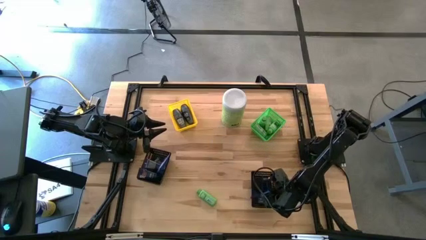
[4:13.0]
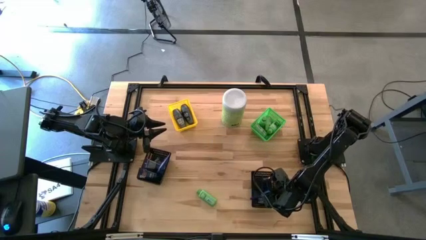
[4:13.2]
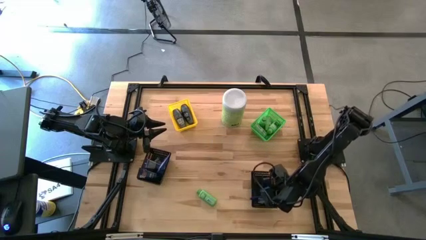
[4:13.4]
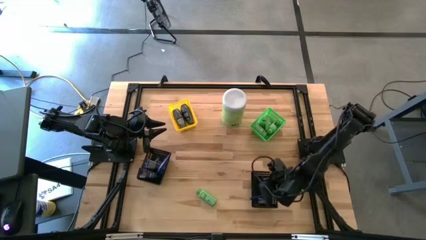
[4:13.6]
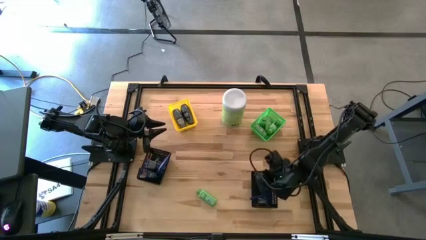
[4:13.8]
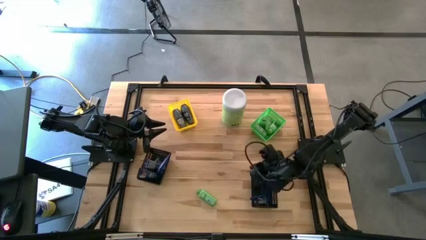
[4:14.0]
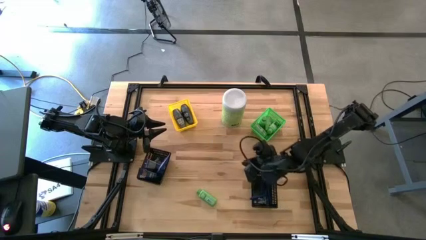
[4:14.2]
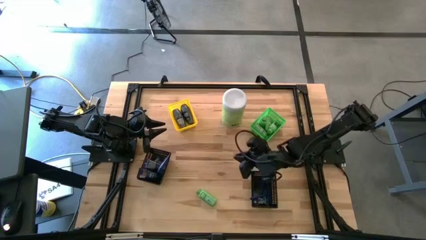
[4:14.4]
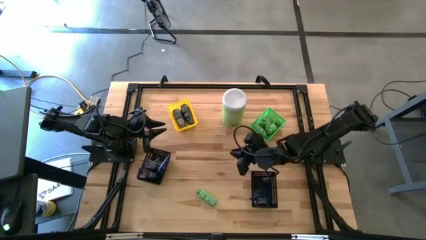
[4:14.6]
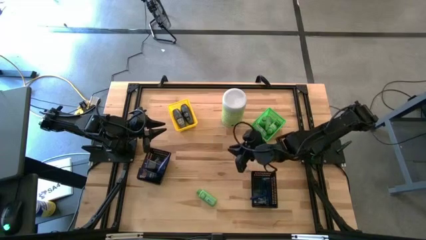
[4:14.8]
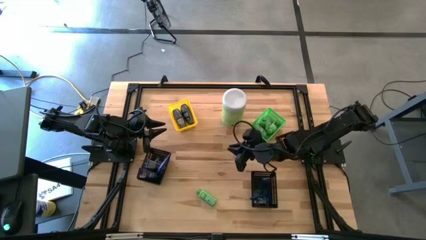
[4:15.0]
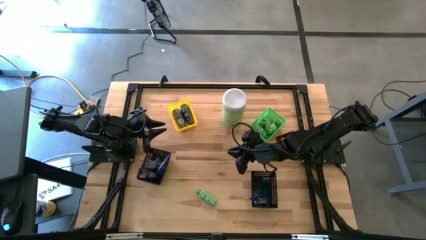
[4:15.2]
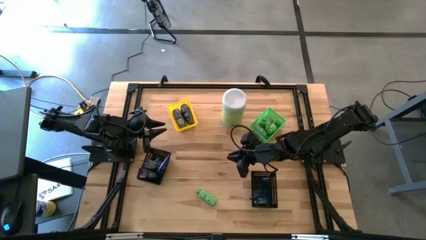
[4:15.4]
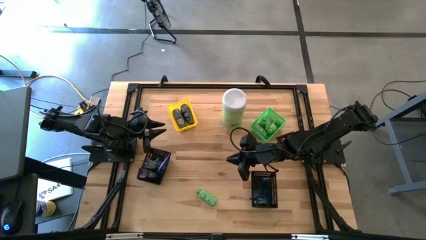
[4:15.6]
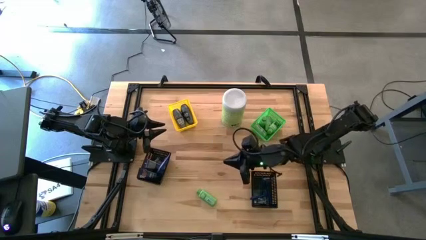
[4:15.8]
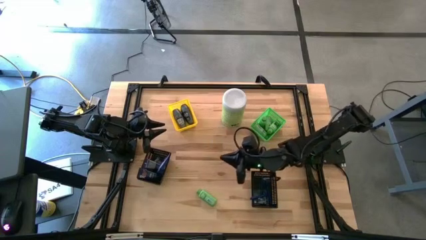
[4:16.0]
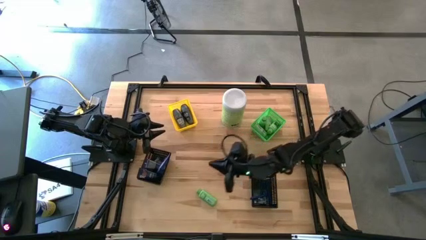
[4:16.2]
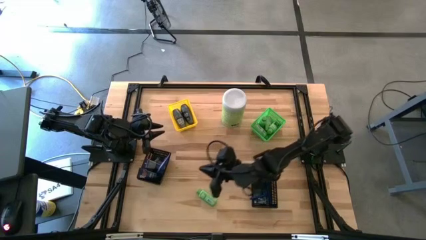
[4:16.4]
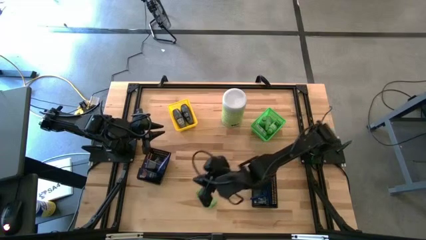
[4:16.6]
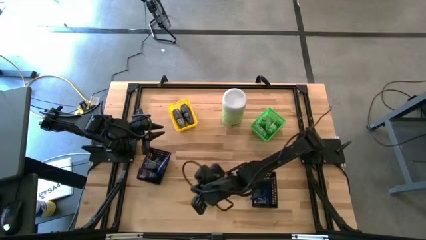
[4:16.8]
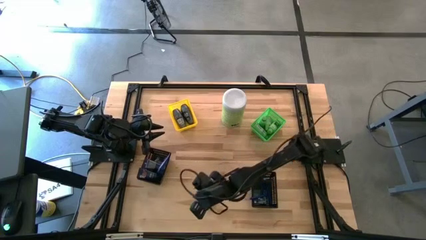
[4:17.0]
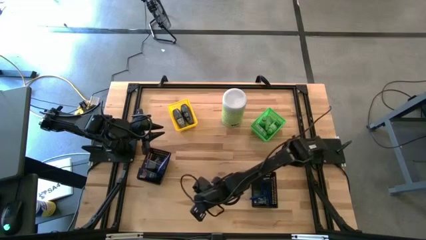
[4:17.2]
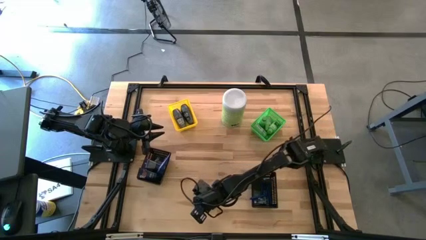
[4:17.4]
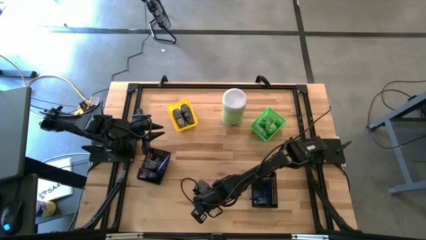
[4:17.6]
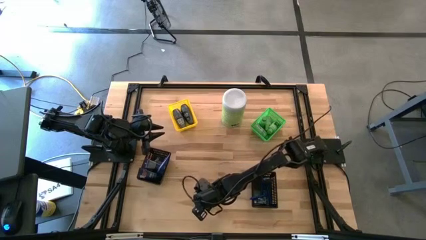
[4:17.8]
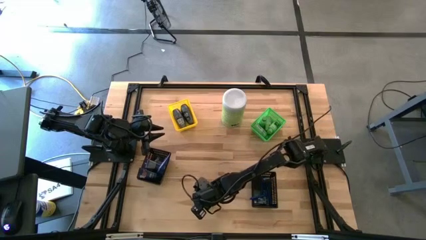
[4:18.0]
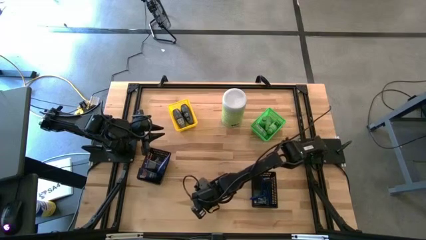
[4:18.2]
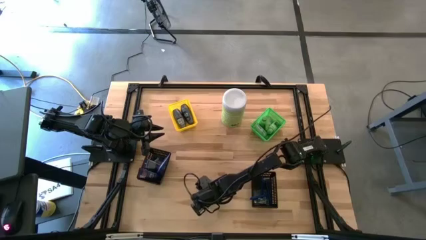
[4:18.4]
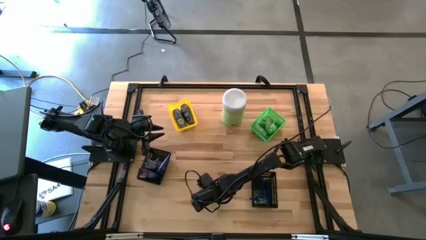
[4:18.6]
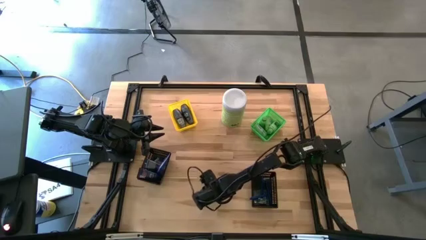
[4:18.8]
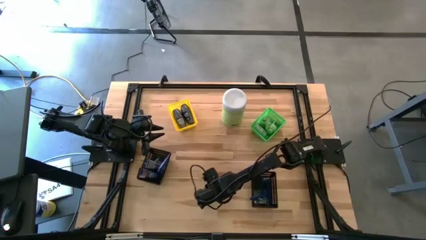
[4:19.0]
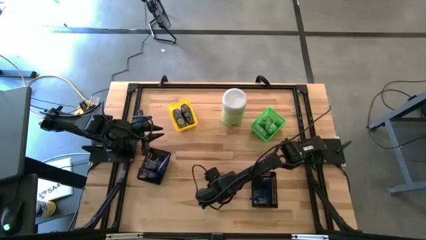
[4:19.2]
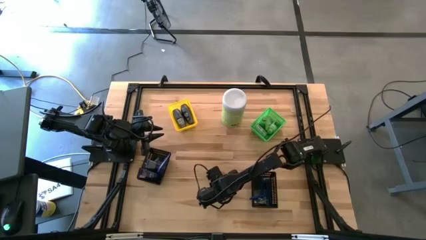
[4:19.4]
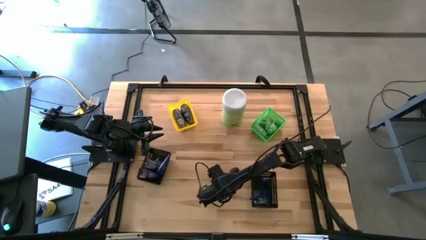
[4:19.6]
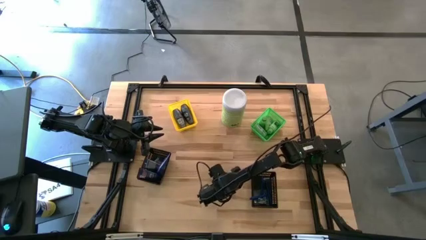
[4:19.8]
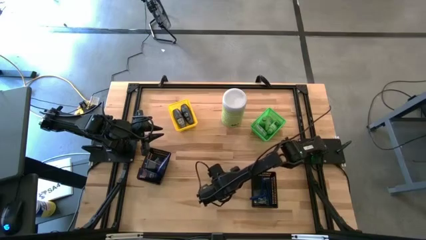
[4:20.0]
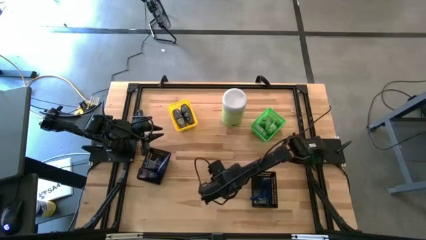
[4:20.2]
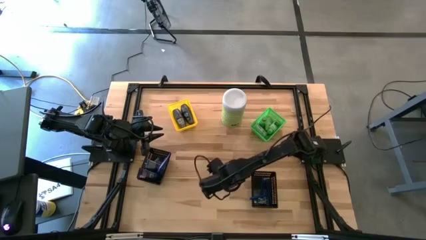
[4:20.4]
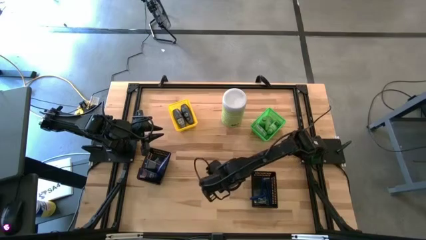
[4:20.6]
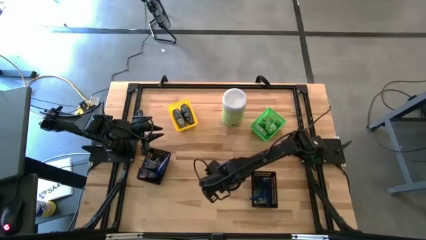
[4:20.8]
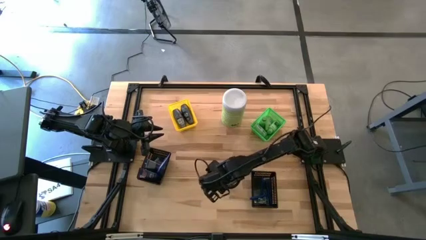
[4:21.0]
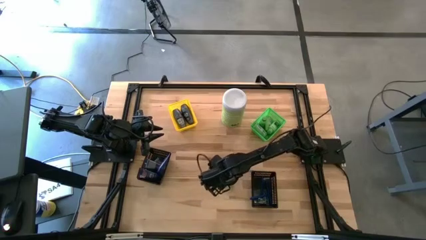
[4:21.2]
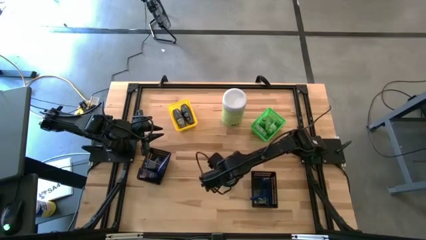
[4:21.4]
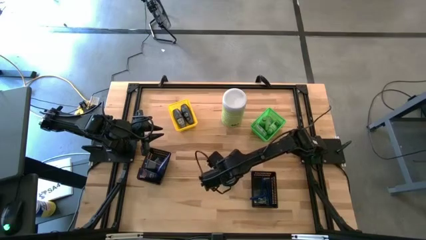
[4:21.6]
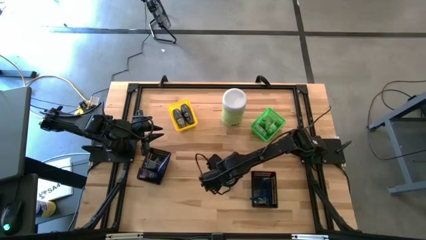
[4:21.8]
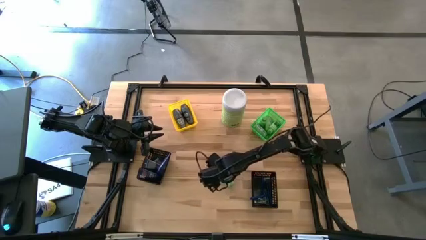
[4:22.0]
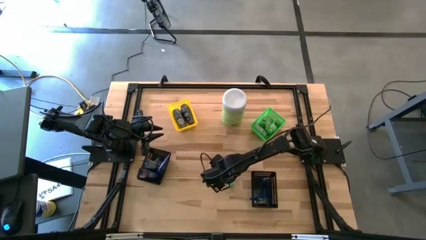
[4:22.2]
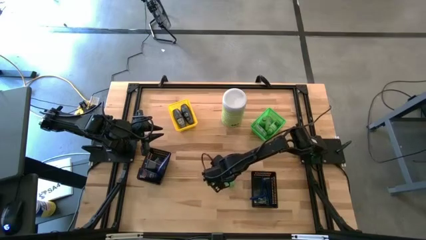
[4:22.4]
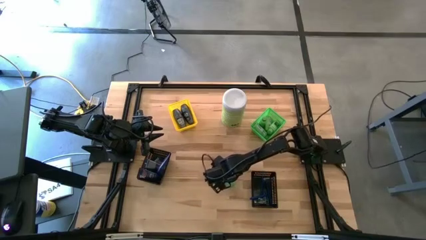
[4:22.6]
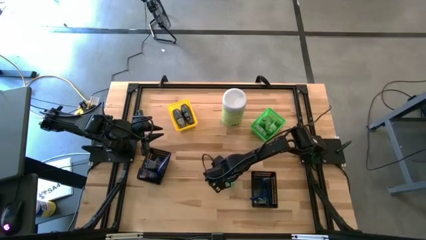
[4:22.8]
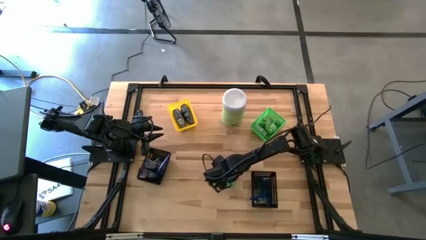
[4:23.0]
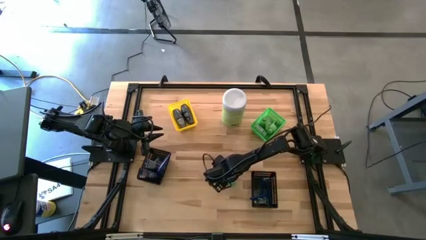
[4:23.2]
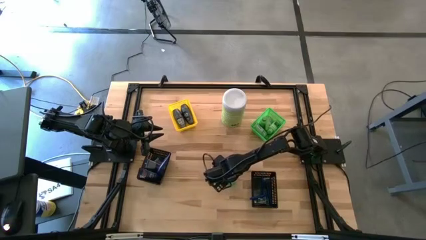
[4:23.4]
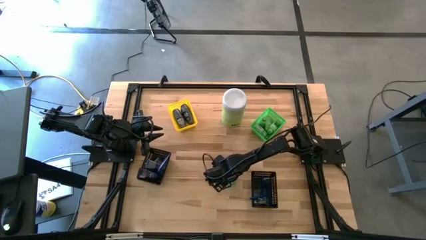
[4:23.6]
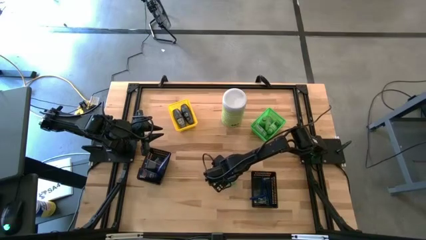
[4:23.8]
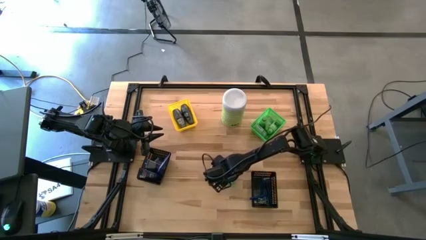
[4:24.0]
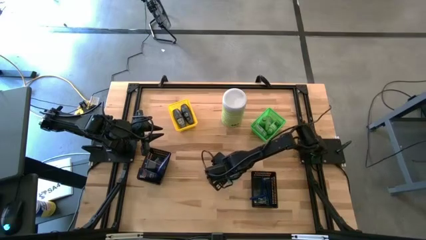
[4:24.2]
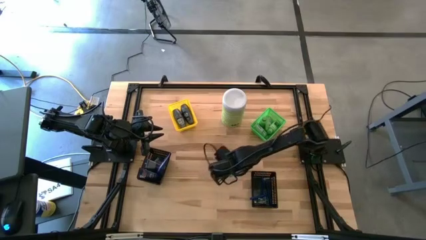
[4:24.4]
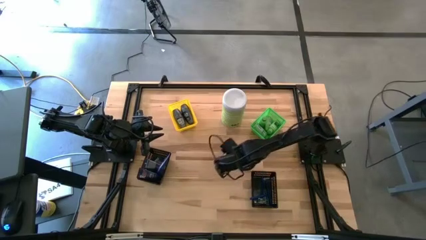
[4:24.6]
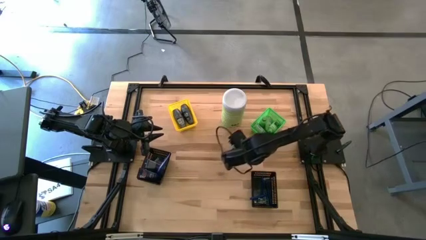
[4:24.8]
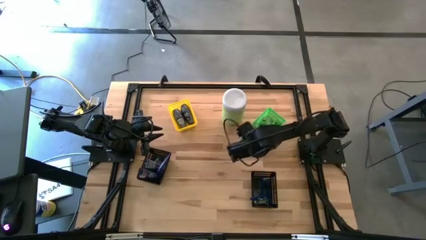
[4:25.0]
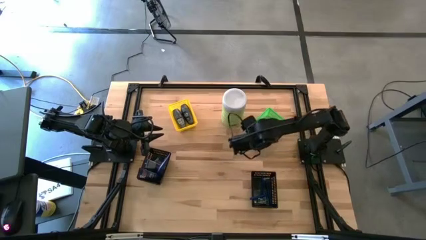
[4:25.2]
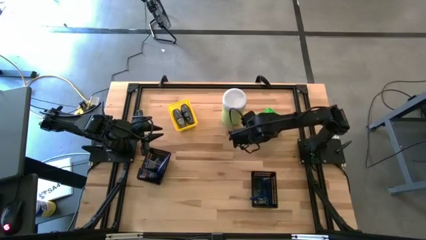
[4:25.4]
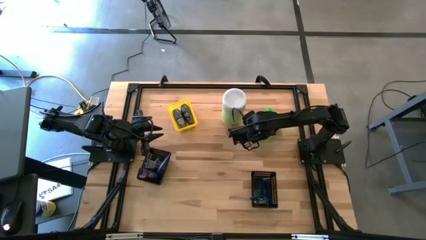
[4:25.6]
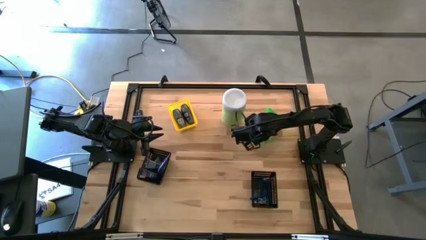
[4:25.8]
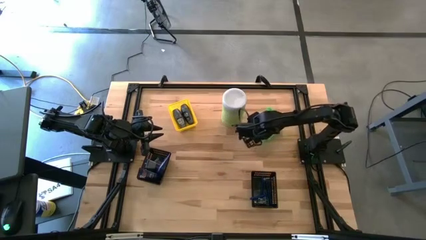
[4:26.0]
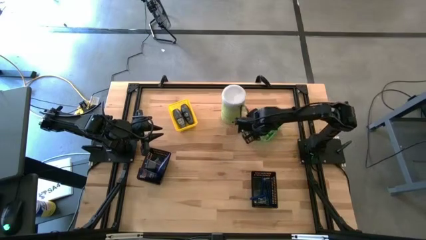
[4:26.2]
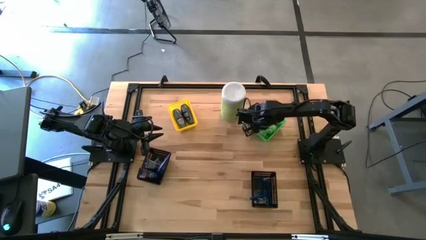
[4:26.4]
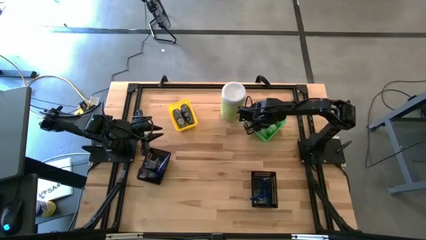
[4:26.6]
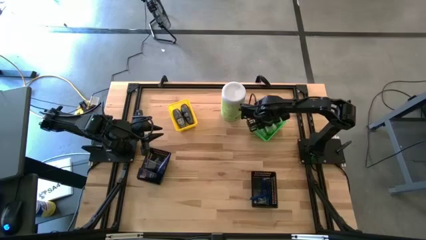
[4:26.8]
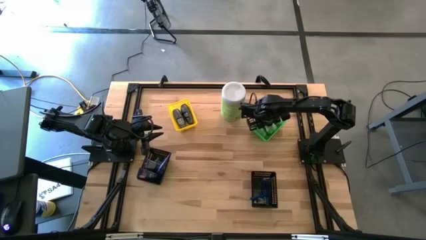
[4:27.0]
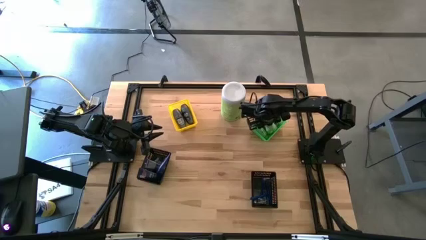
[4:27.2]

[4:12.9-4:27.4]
Task: Pick & Place Travel size toiletries
Put the shampoo bottle bottle into the green bin

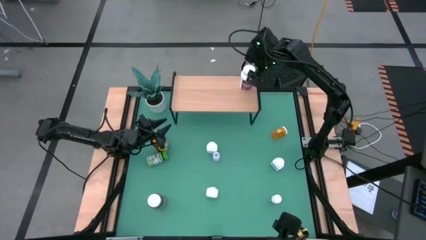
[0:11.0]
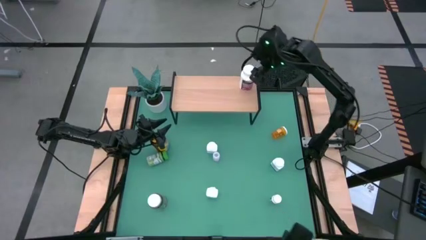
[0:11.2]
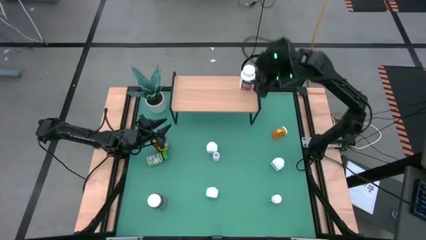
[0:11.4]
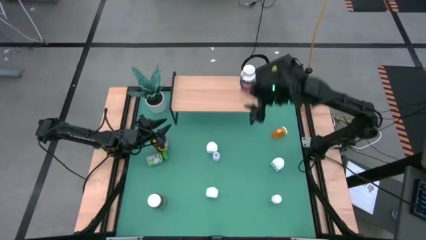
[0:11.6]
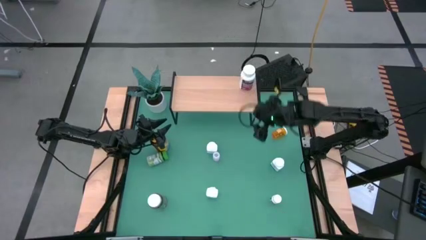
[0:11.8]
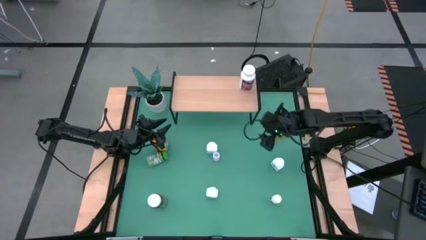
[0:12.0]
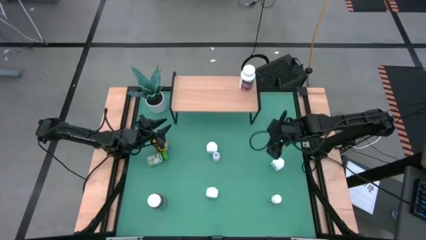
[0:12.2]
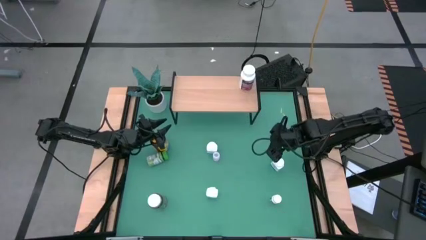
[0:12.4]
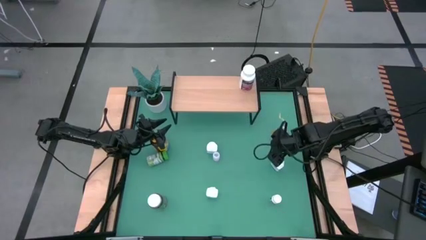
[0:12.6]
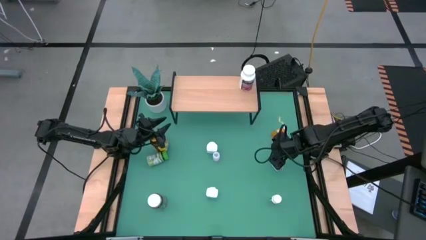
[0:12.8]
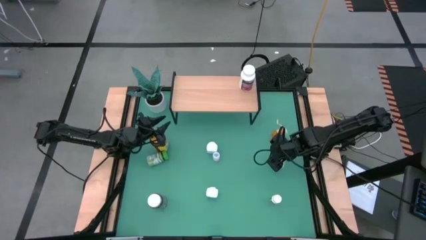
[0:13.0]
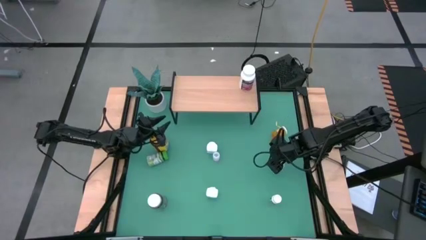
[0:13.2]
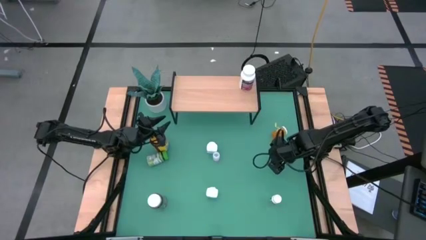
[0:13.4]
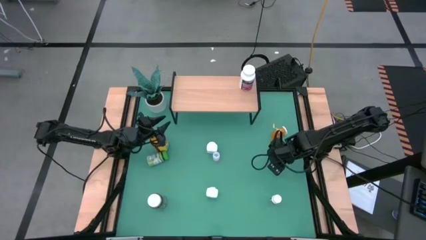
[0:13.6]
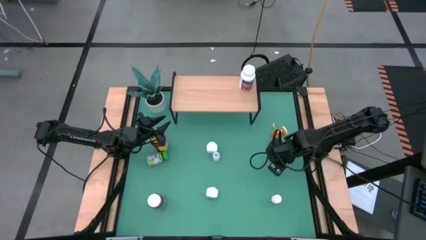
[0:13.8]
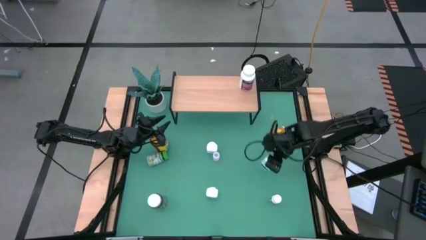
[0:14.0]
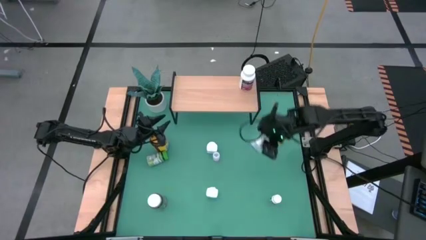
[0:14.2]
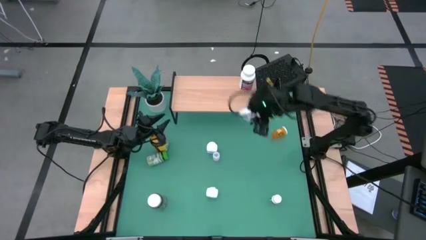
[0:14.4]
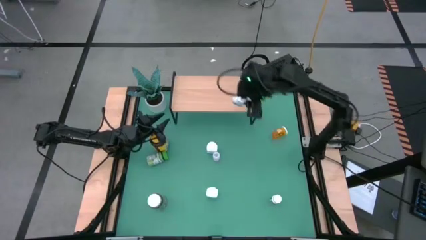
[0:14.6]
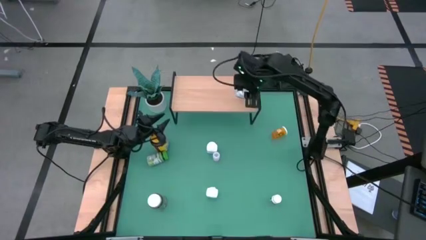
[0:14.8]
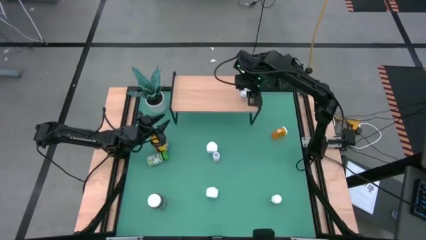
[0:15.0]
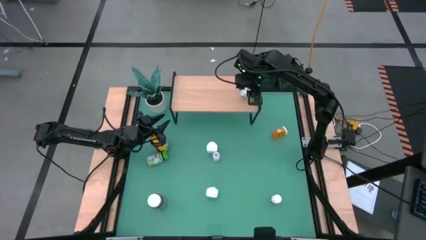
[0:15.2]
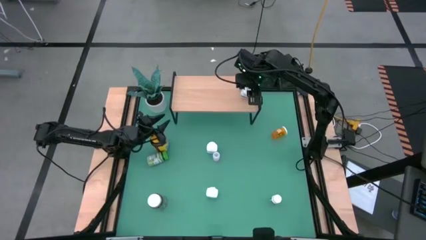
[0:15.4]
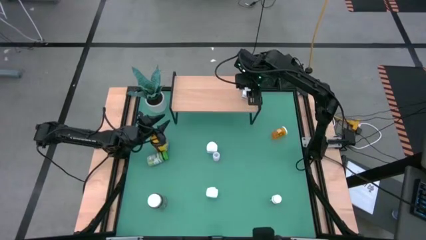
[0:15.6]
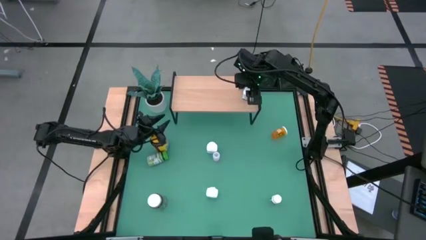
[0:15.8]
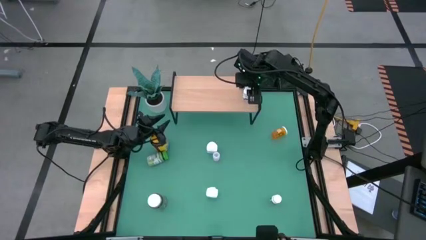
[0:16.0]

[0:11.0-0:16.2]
Task: Pick and place medicine bottles onto shelf by color
Put the white blue medicine bottle on the top right of the shelf
